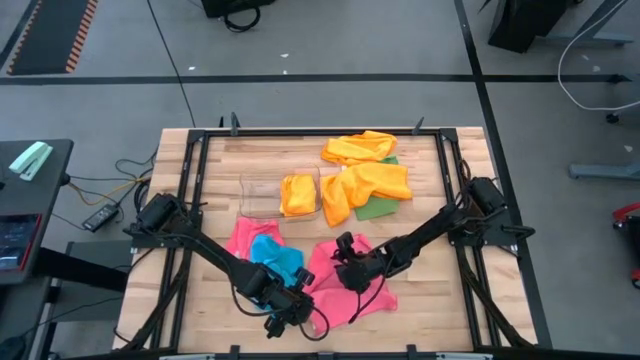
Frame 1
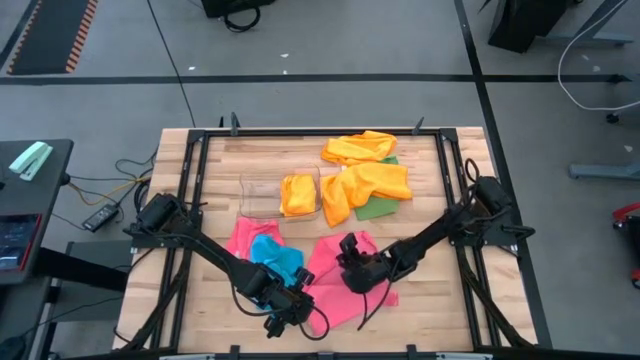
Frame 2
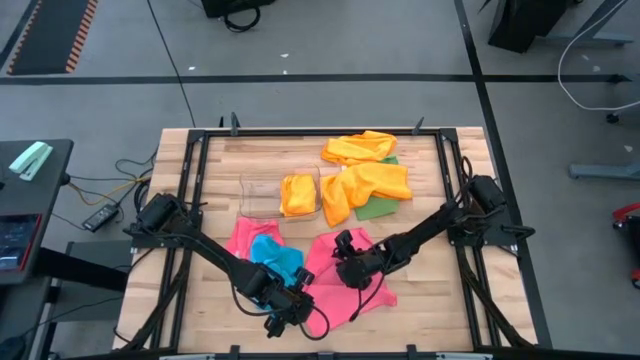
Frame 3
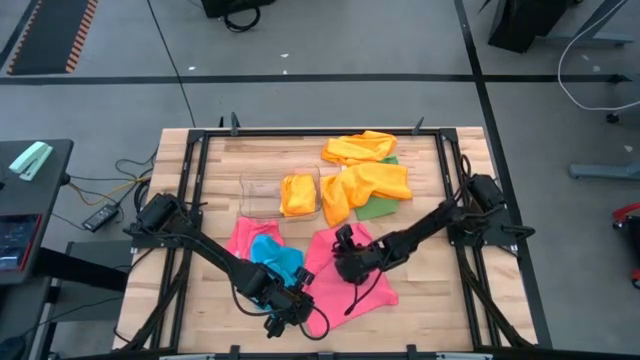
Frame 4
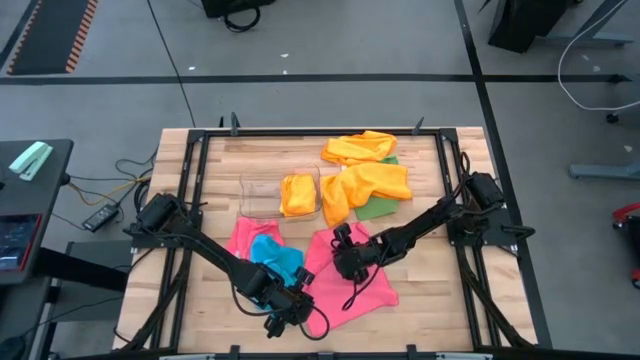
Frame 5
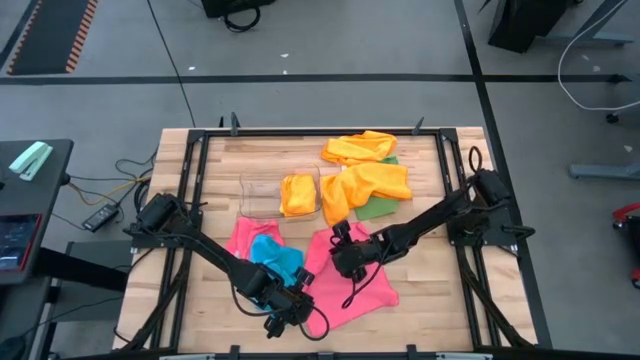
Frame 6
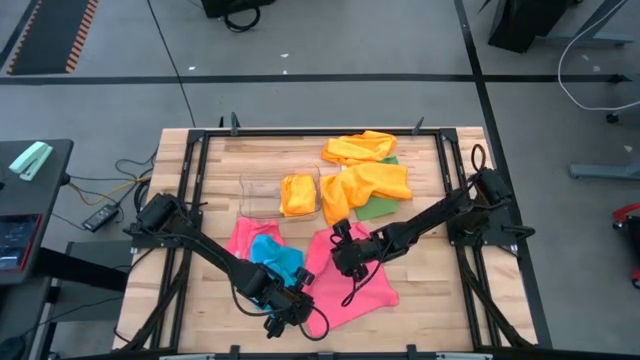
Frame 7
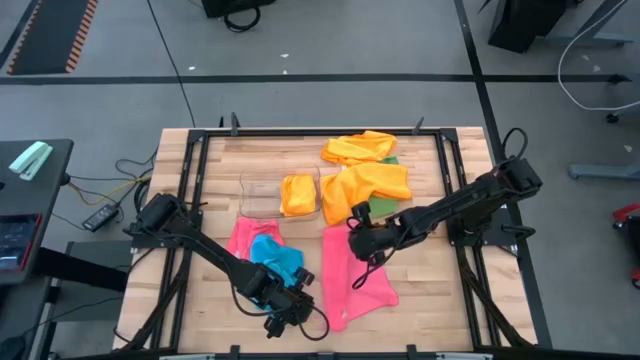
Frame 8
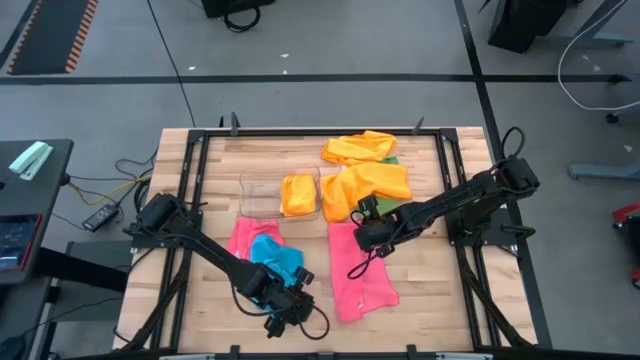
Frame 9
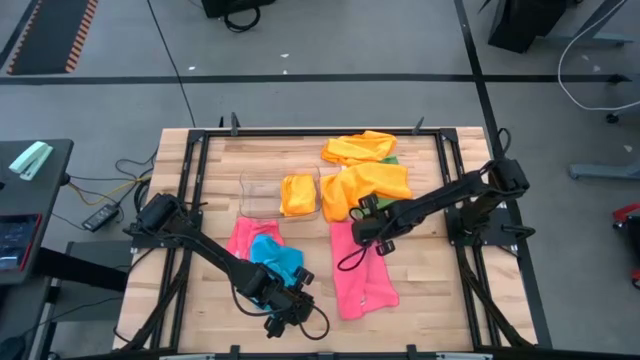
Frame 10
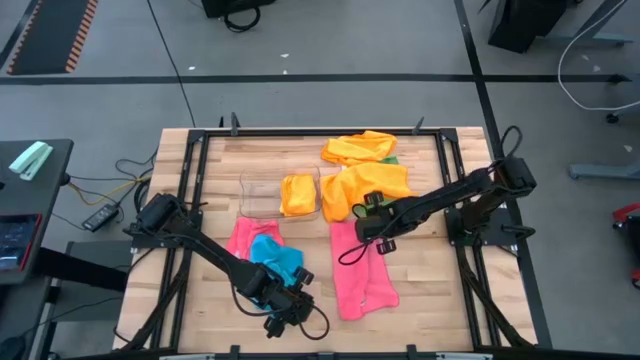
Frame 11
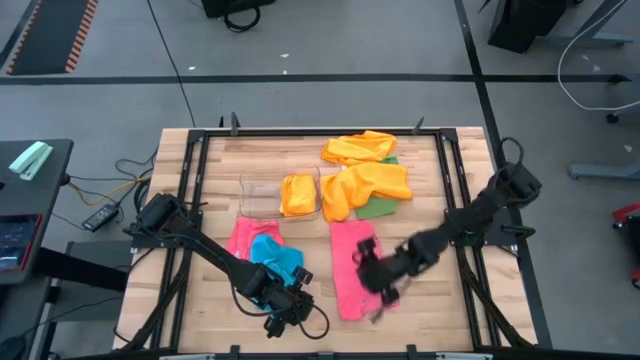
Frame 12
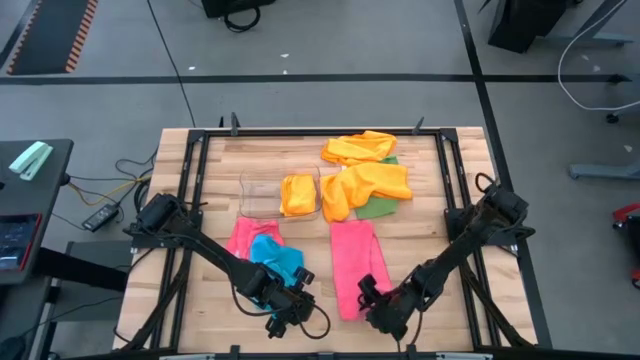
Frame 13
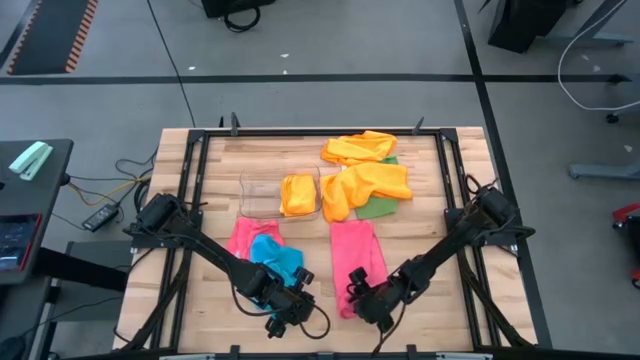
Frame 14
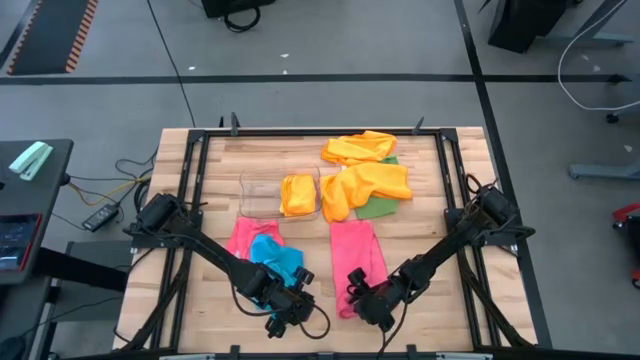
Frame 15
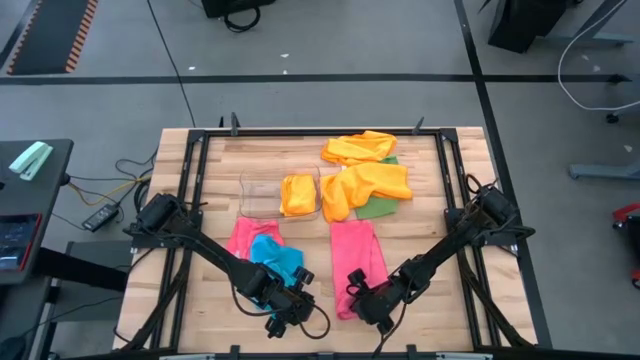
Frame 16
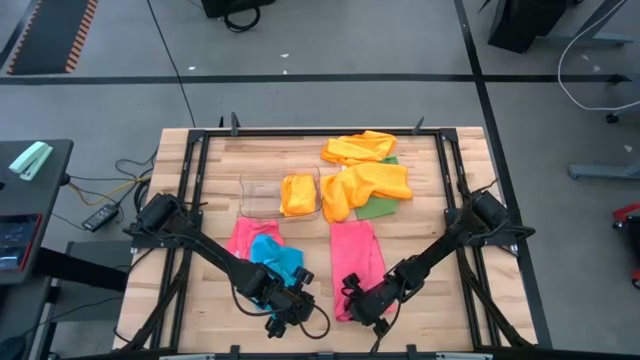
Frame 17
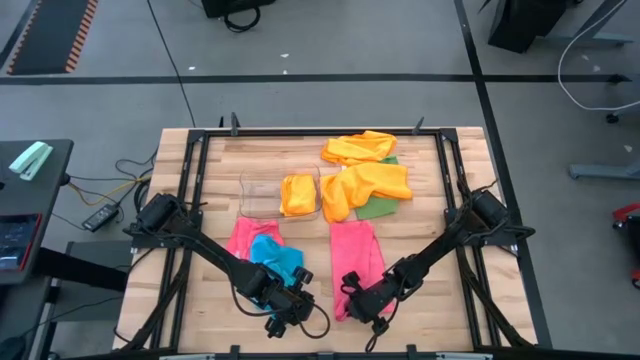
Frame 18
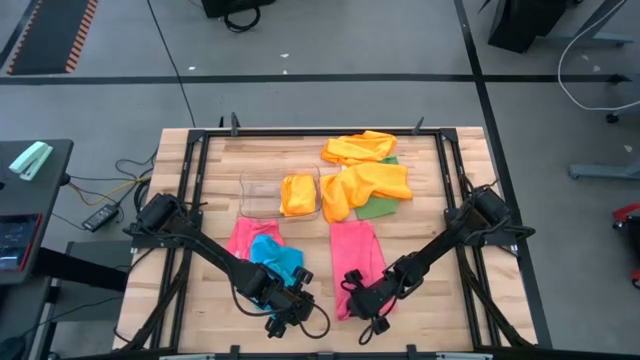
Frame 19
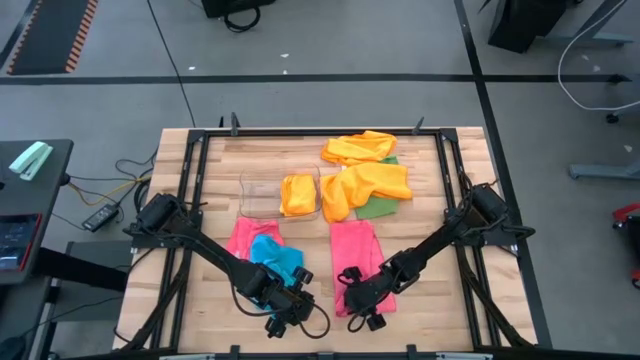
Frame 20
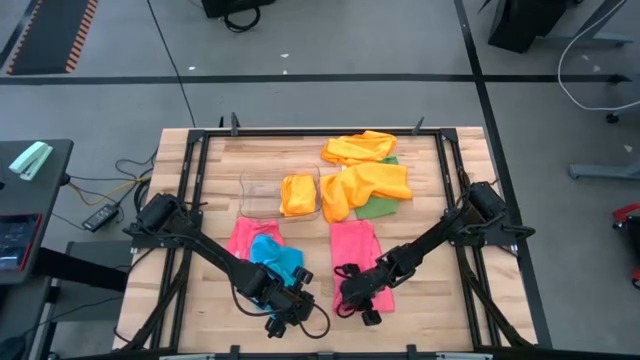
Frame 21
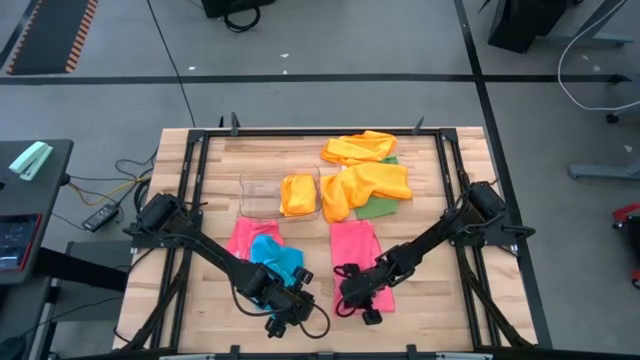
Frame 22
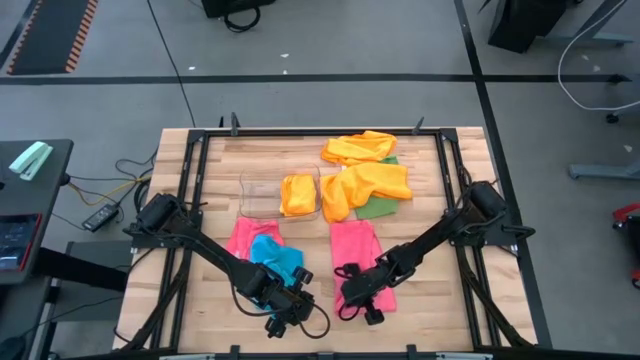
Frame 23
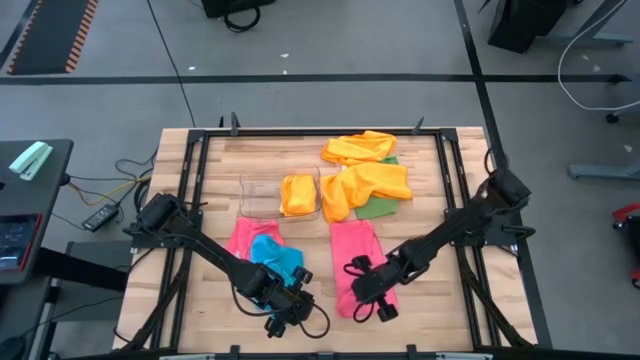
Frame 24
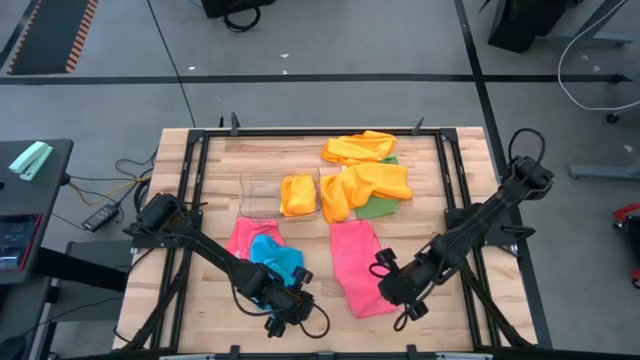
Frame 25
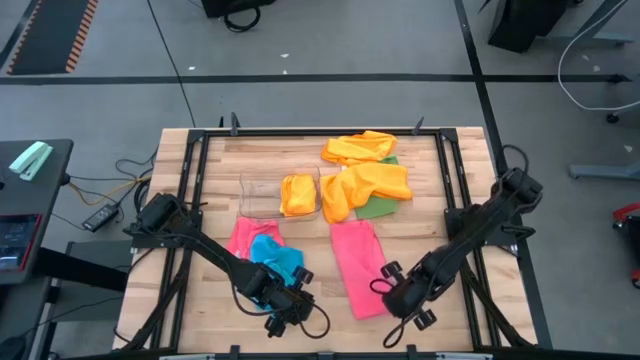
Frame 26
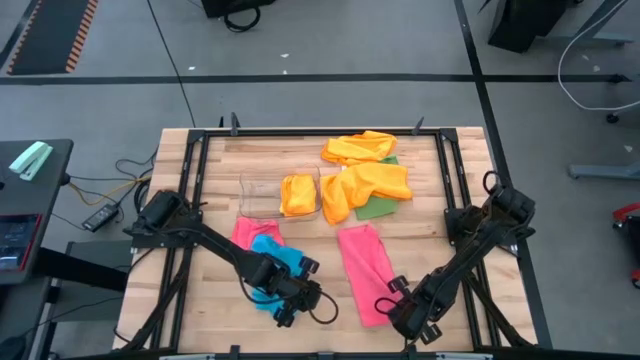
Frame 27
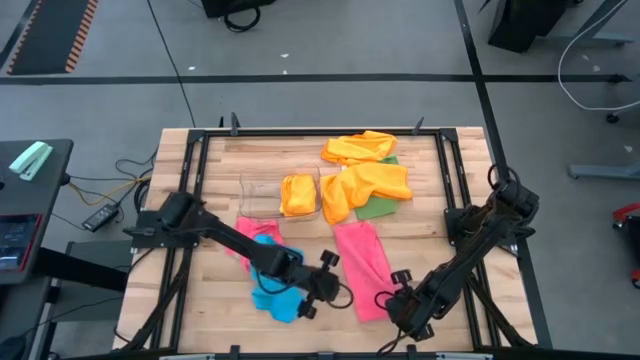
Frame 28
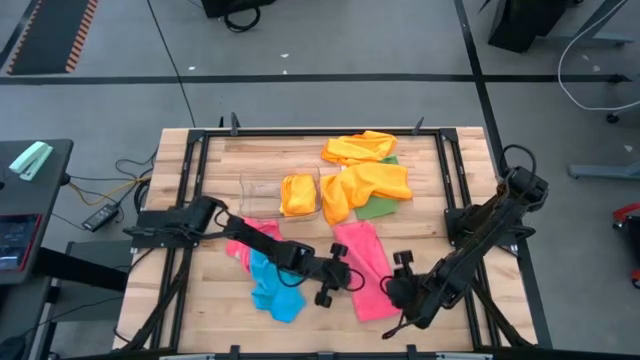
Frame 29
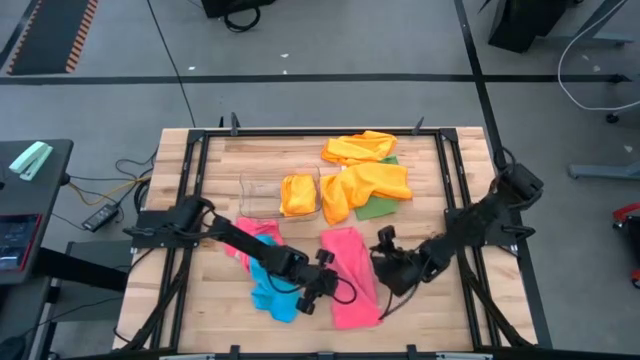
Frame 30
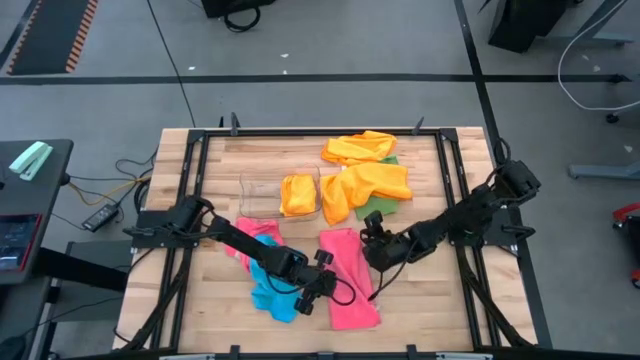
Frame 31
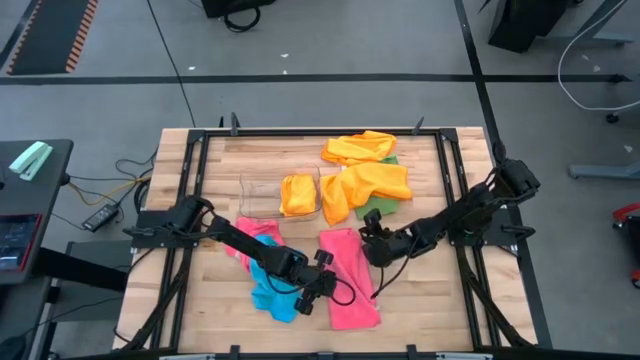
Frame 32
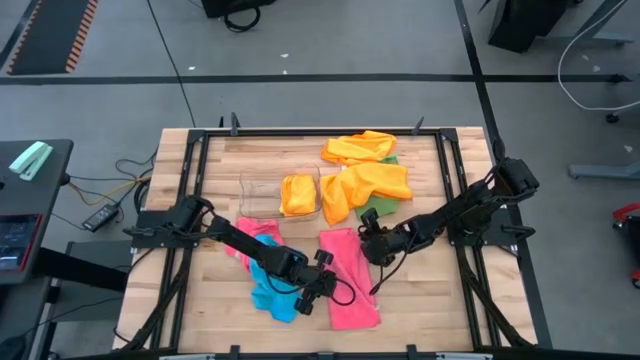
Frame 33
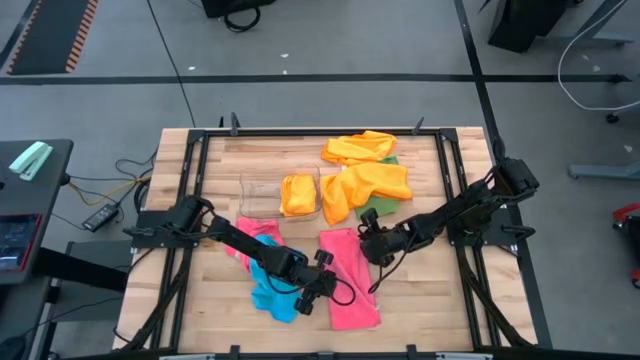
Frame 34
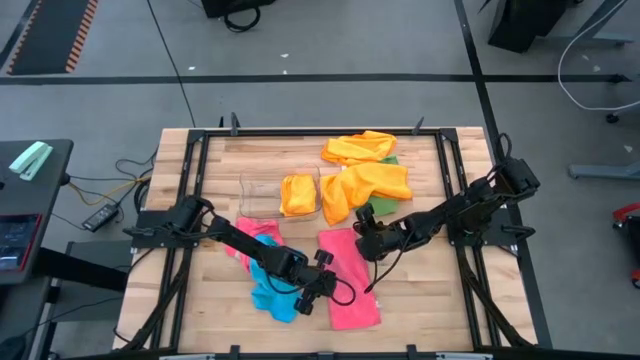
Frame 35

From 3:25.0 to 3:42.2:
Task: Fold microfiber towels
Fold the right pink microfiber cloth
